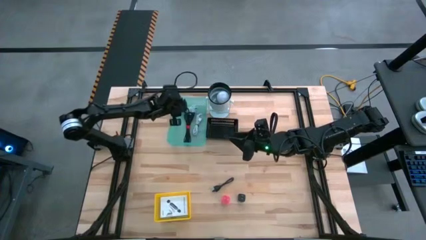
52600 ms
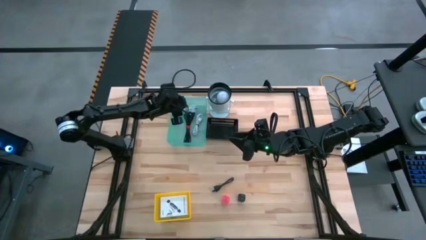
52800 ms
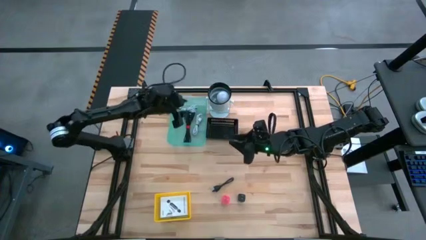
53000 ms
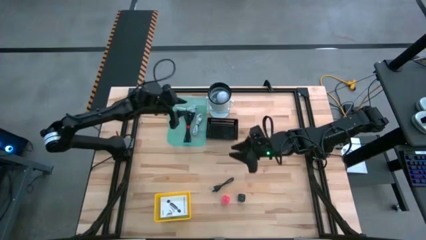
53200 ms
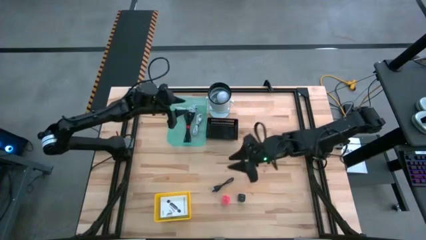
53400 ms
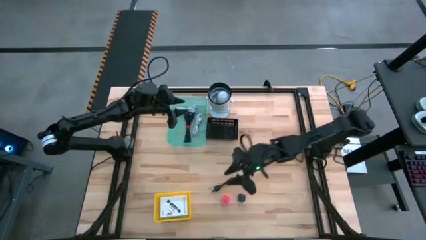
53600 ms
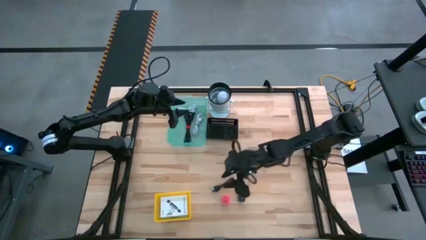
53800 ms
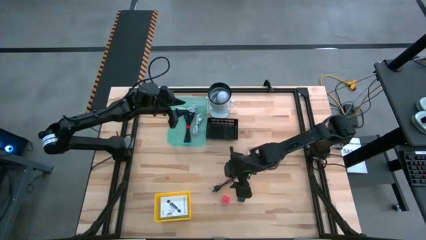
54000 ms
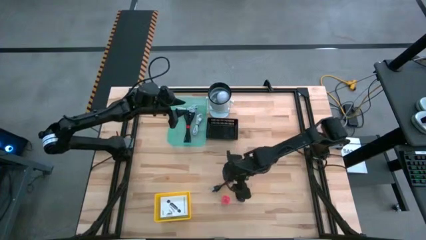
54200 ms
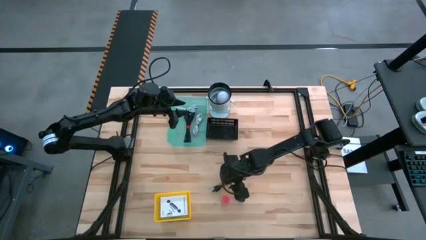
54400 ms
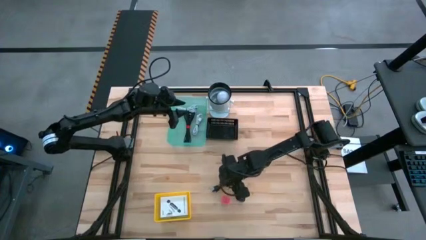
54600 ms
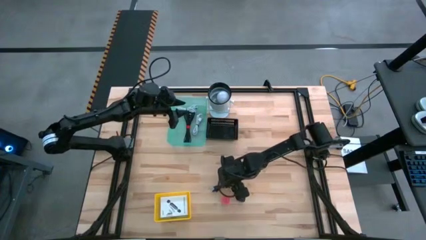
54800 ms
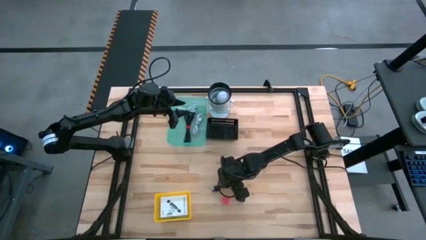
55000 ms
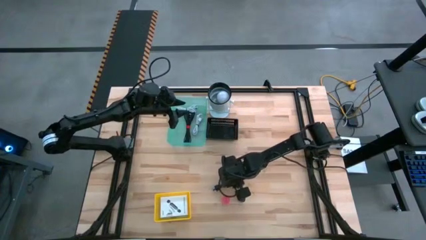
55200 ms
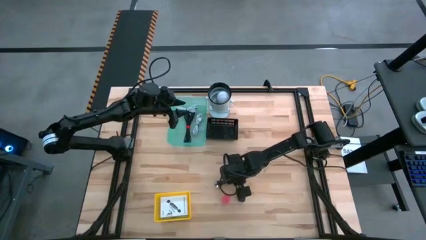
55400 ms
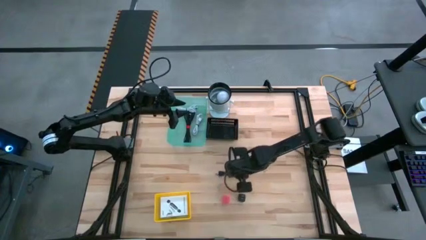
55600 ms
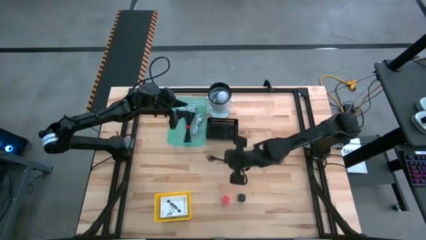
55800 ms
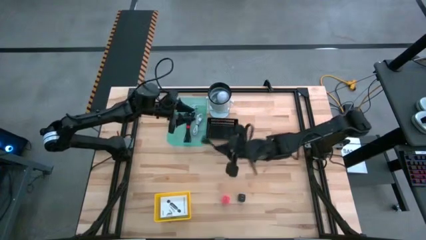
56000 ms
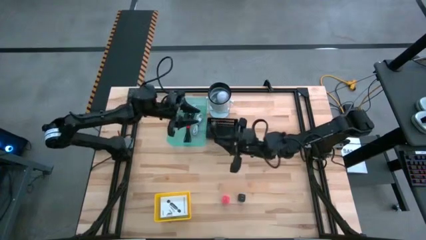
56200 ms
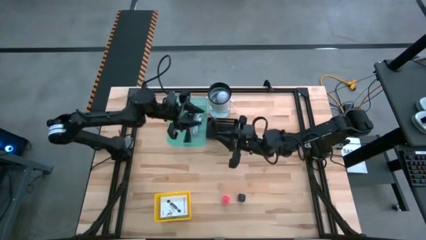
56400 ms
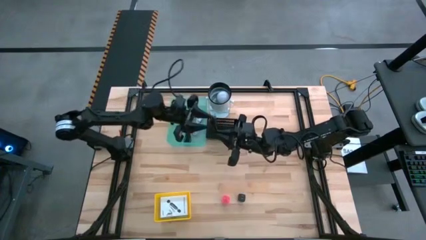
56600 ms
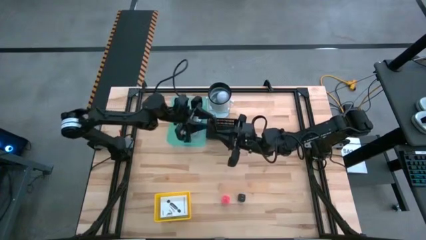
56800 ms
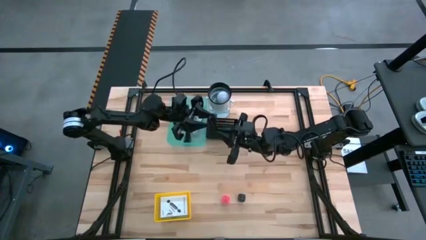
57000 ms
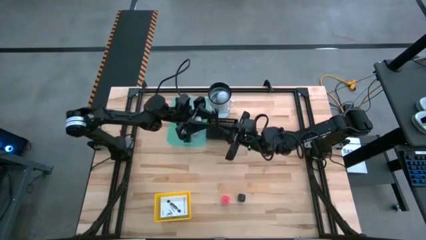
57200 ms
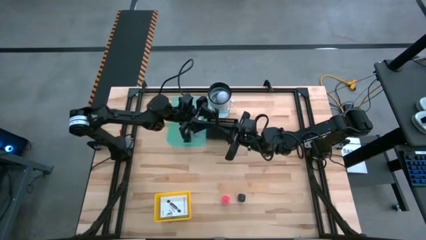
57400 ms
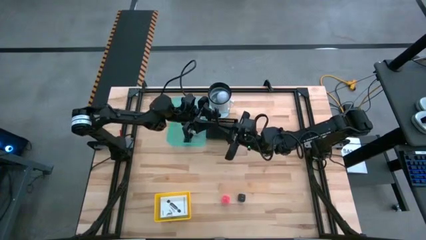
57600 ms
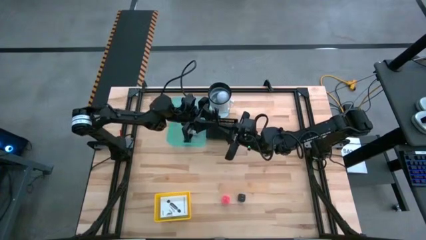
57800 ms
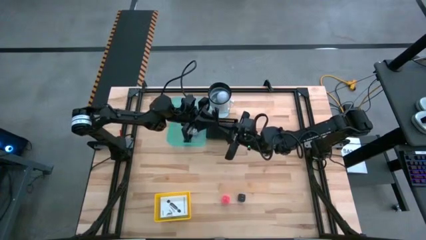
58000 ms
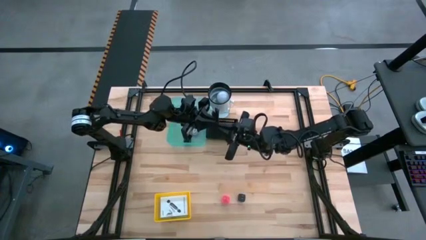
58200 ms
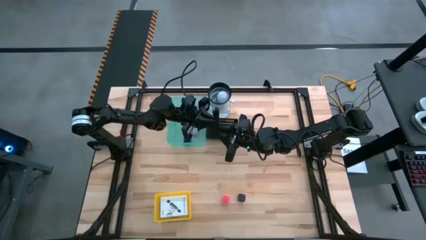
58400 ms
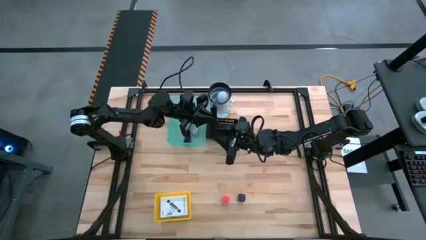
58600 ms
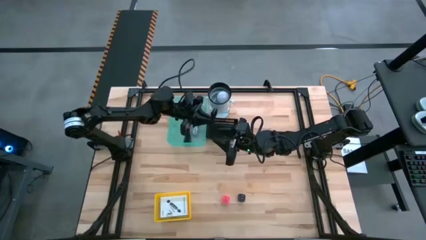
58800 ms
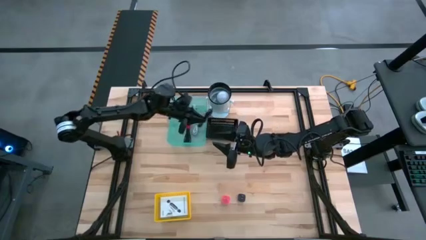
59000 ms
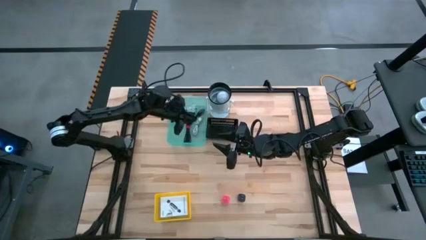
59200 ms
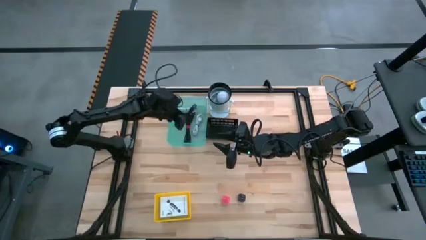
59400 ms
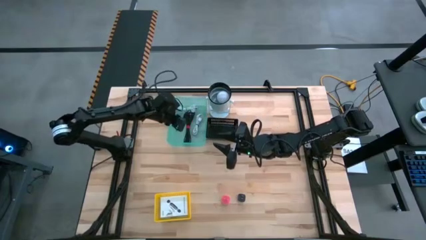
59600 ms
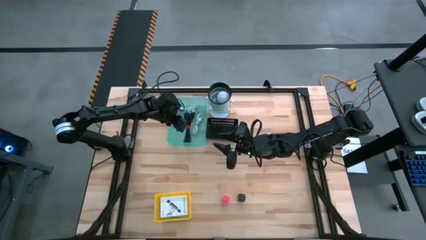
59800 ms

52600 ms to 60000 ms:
Task: Pick and place items into bin
Put the black charger cable into the green bin

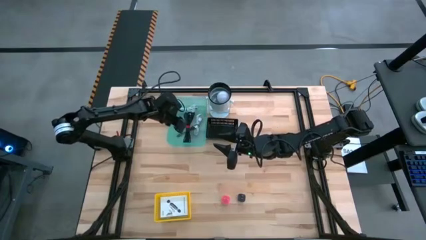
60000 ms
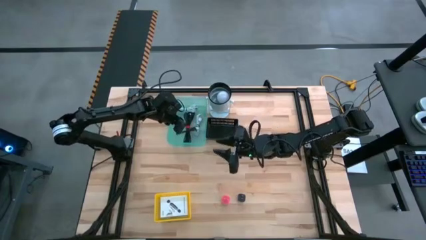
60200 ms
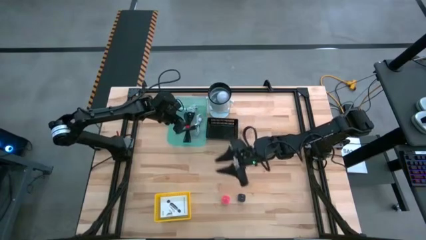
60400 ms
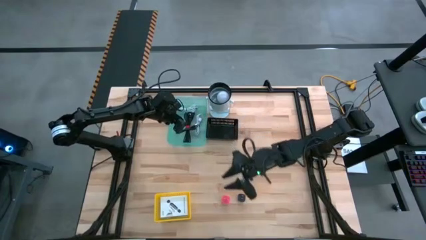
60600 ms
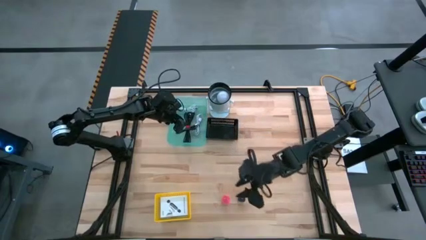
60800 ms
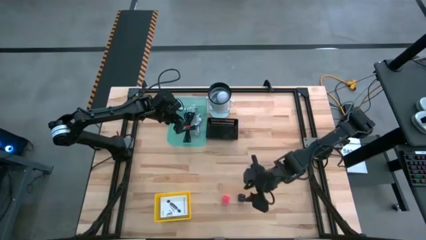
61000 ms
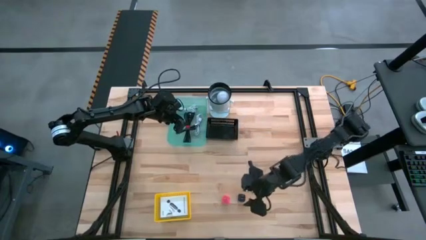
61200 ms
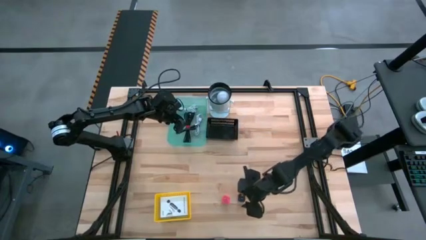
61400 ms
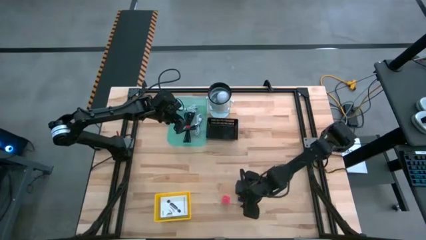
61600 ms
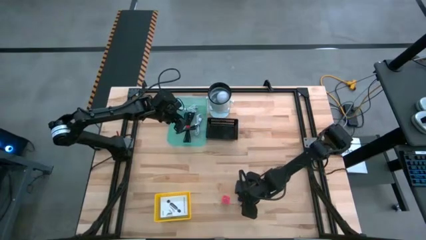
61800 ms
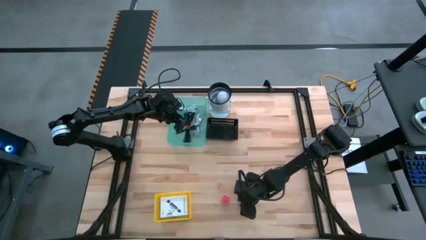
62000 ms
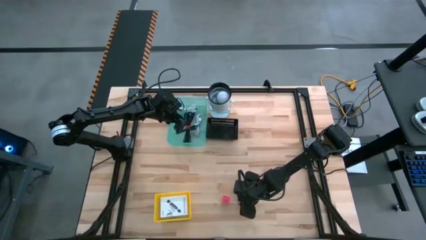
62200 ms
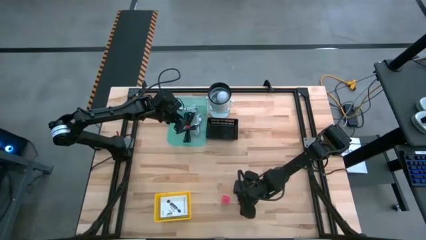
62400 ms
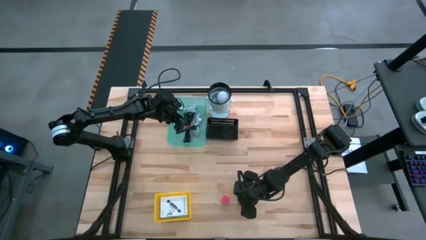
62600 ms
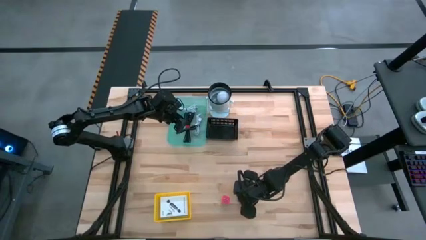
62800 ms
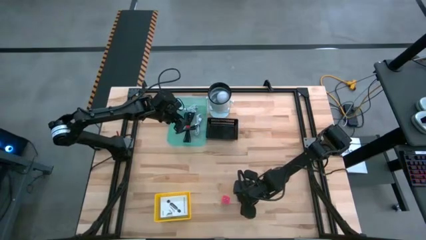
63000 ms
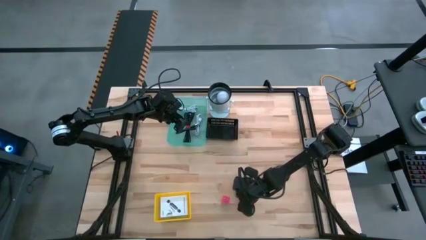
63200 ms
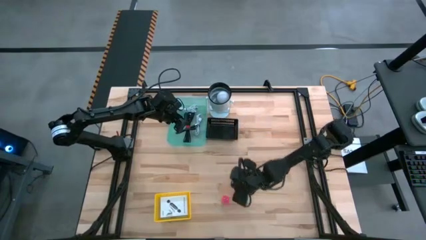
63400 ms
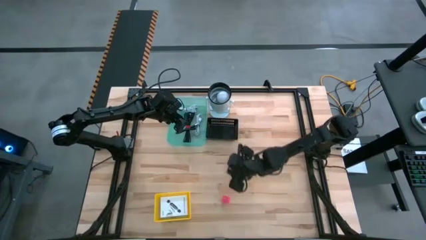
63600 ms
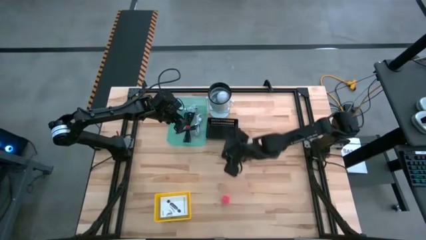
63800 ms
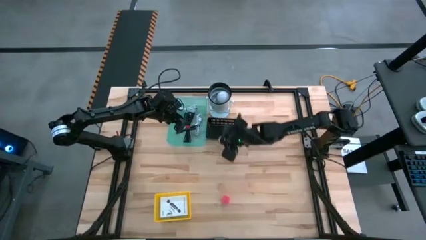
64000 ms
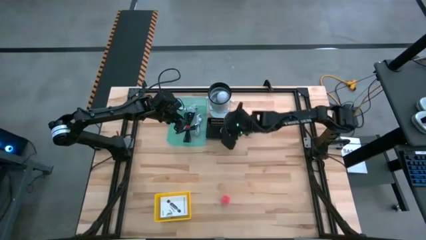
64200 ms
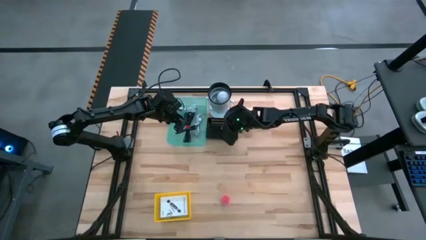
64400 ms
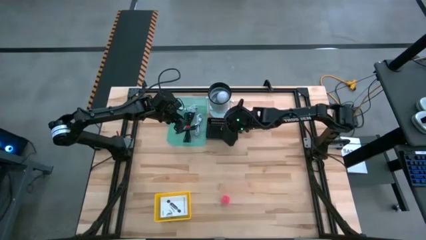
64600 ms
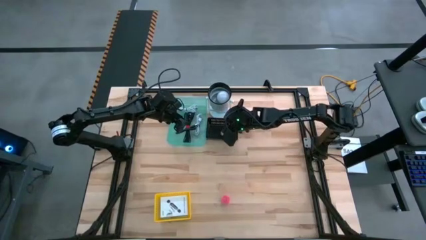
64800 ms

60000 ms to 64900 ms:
Put the black charger adapter into the black bin

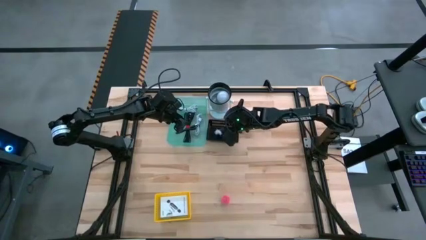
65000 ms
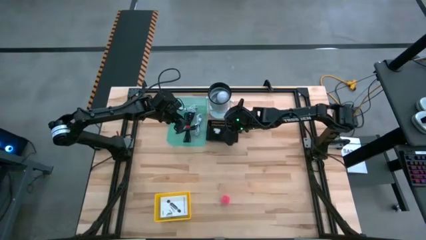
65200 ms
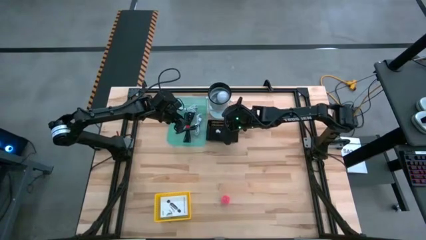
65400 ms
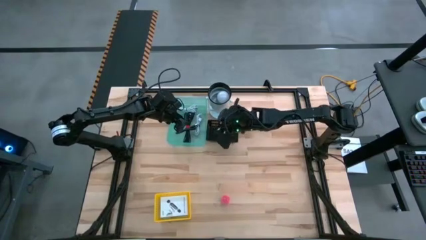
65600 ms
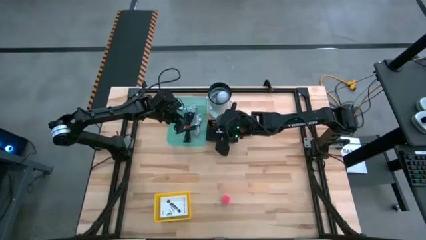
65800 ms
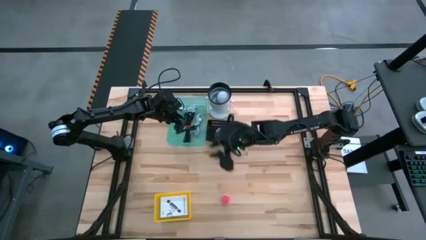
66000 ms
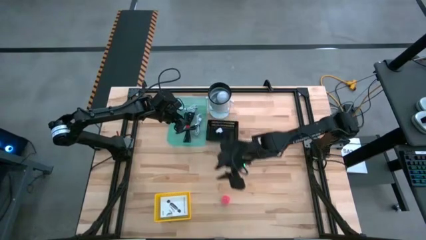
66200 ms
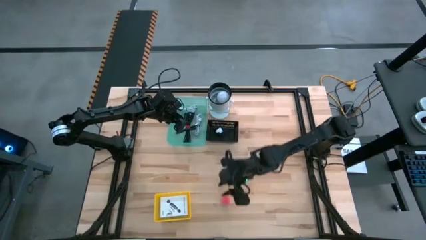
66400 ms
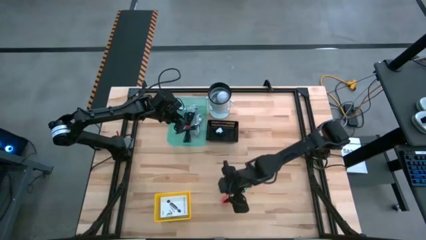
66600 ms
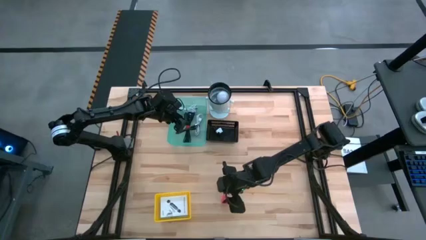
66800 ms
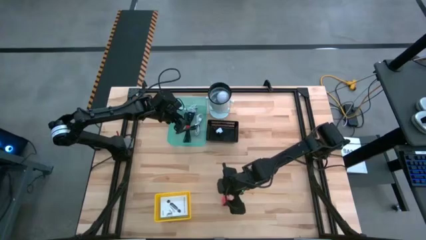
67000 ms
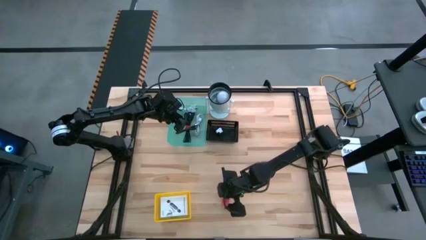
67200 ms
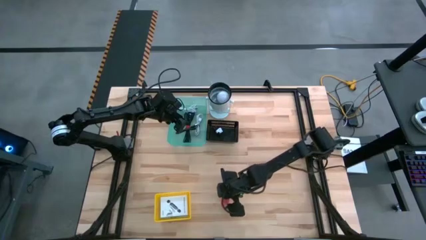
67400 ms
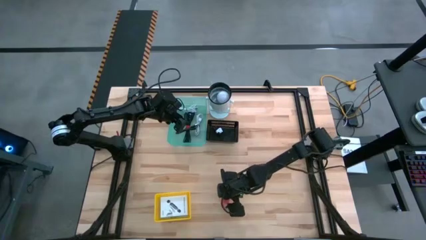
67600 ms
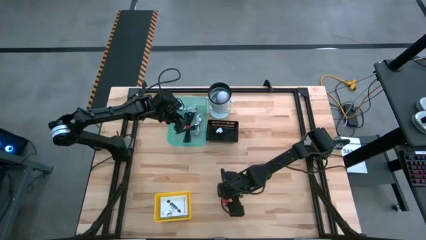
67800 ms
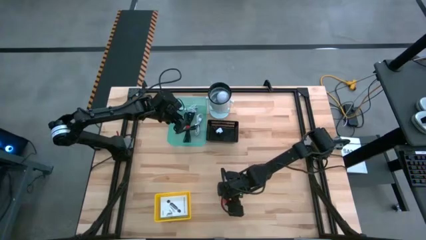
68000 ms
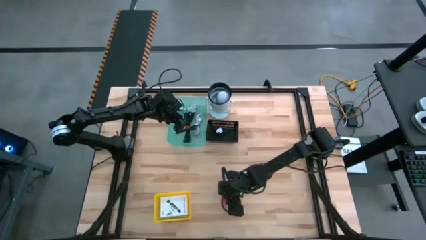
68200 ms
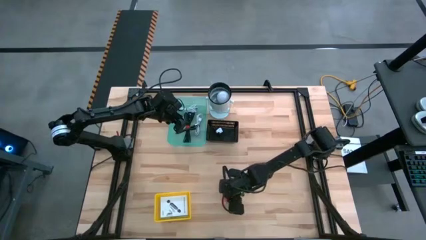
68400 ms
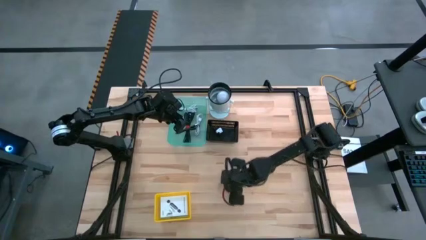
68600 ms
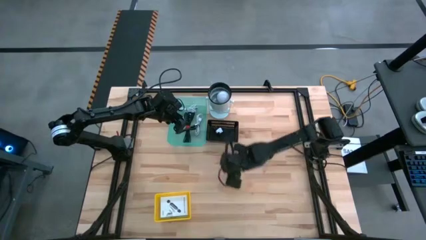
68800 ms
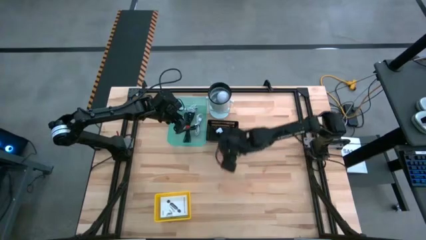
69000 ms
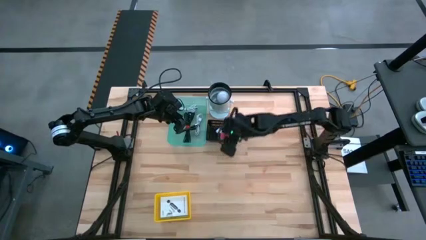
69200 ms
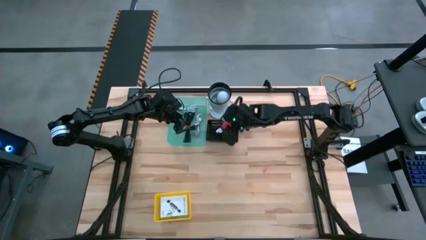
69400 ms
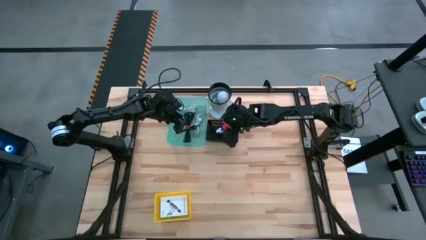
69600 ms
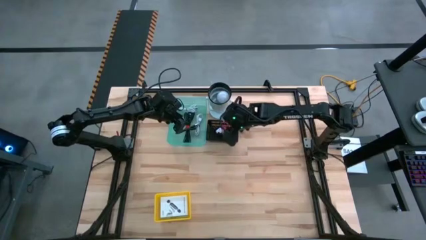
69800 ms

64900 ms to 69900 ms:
Put the pink charger adapter into the black bin
